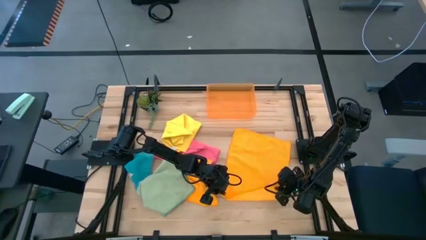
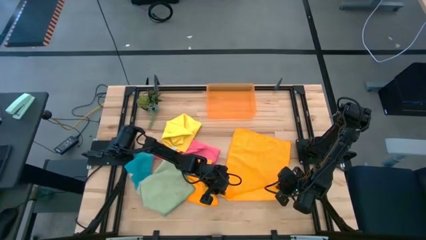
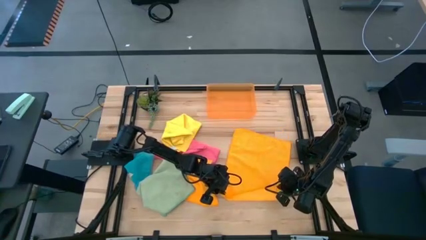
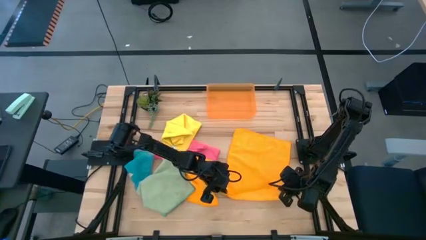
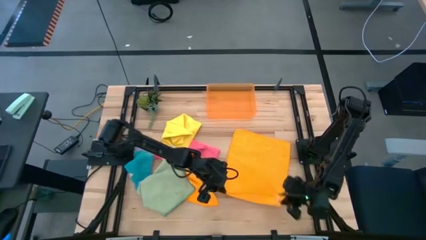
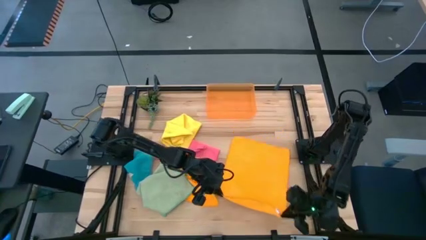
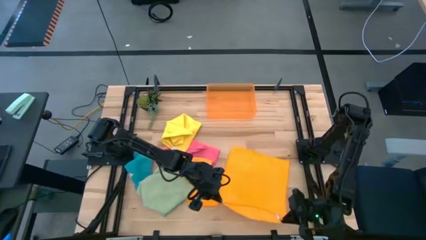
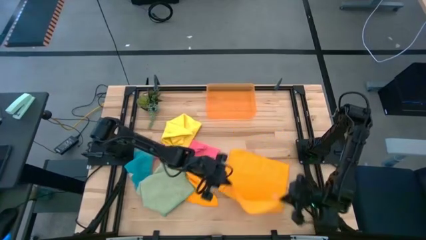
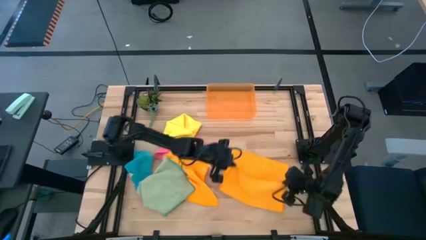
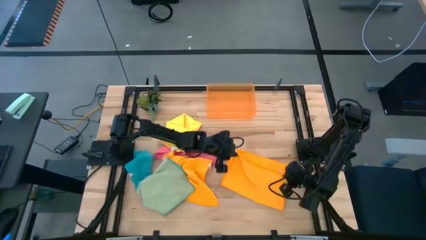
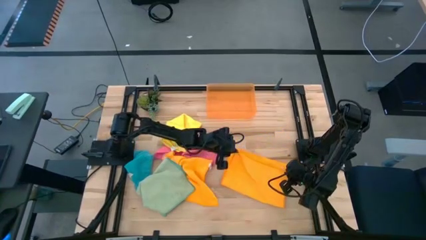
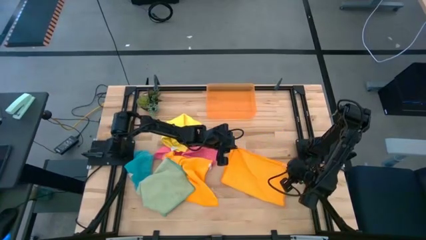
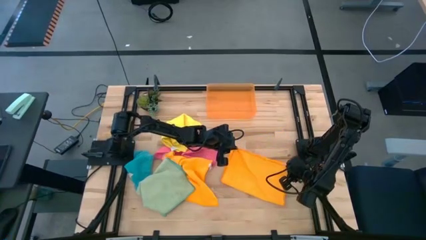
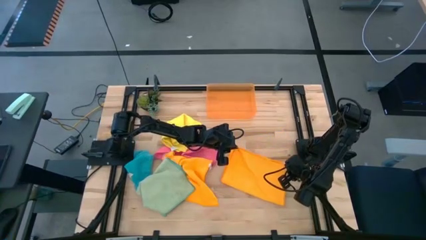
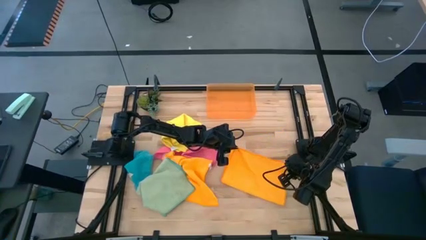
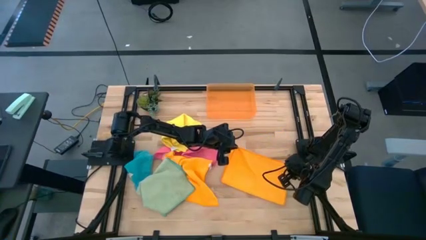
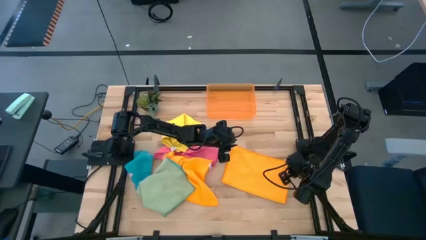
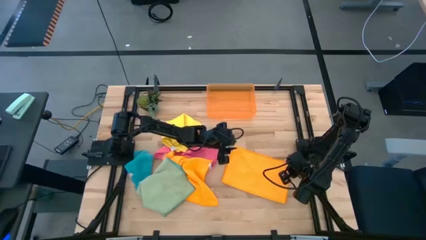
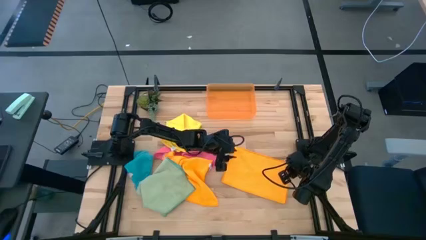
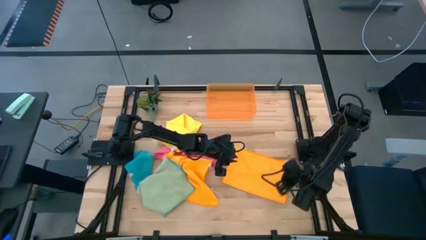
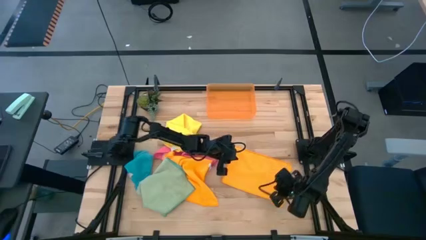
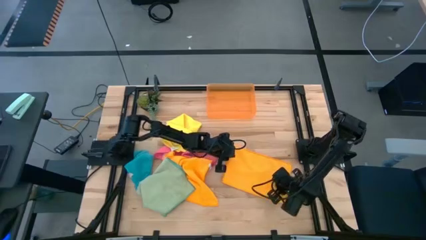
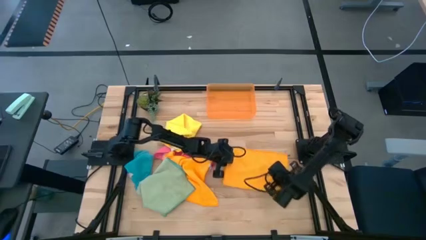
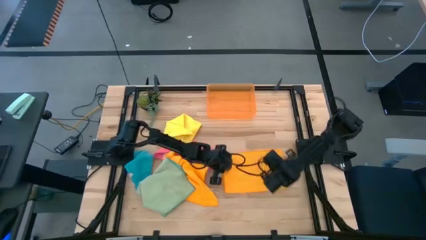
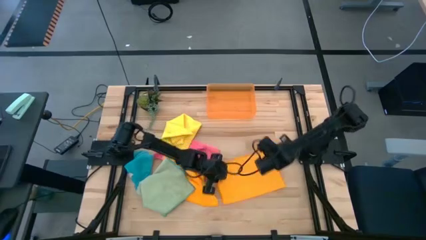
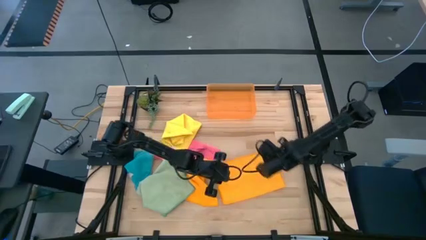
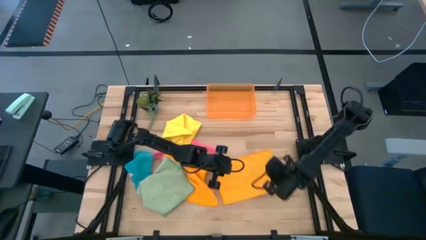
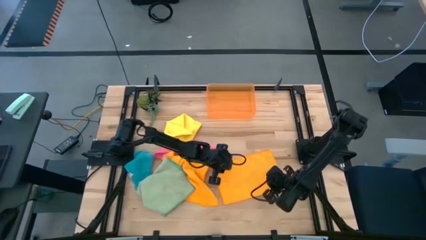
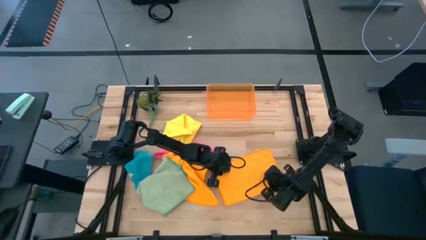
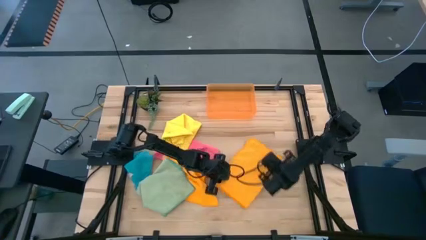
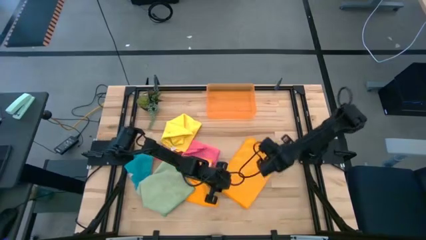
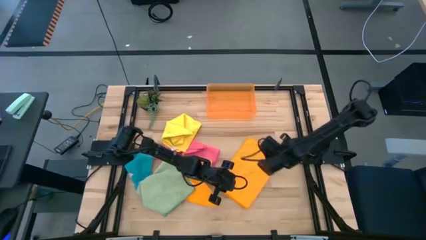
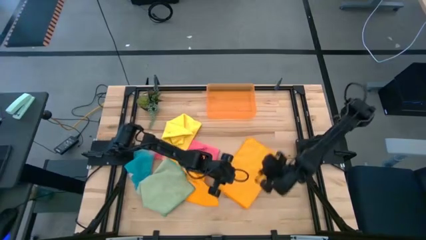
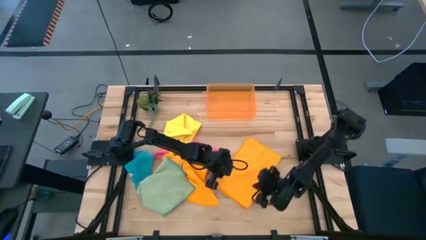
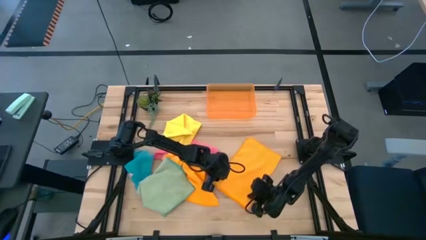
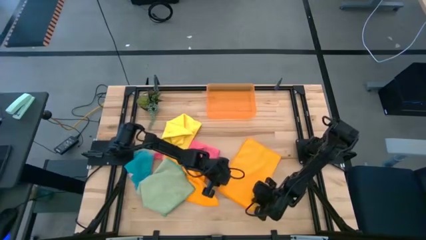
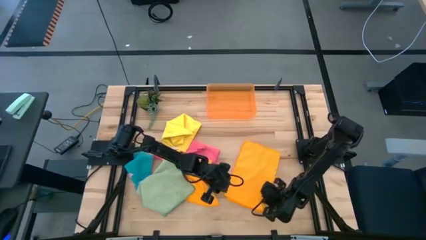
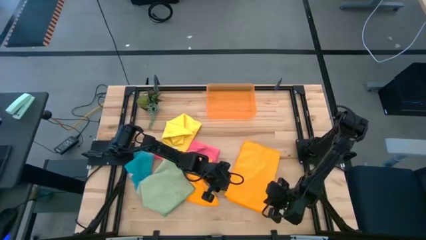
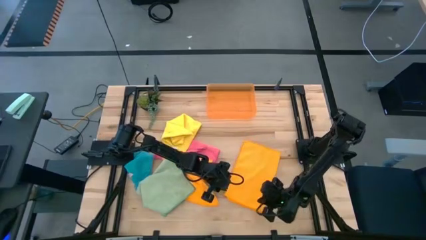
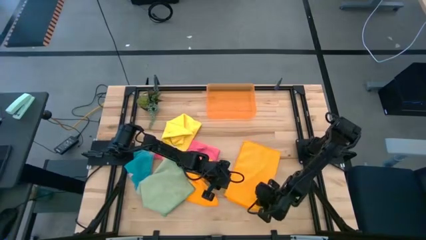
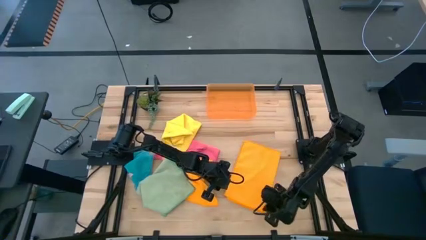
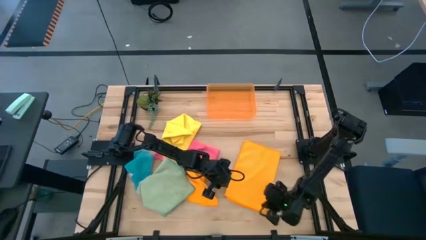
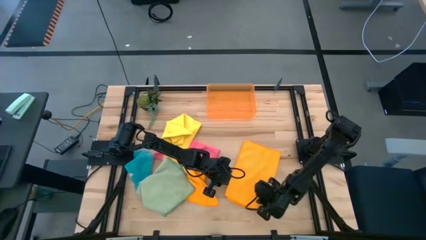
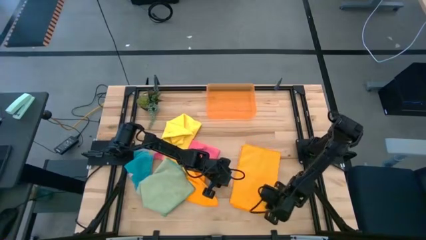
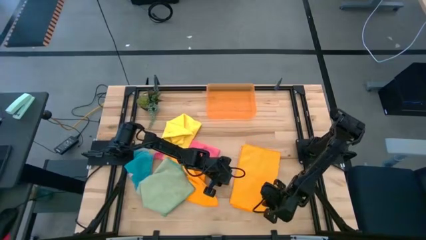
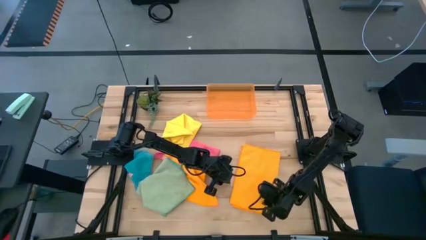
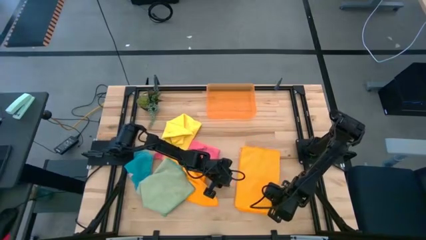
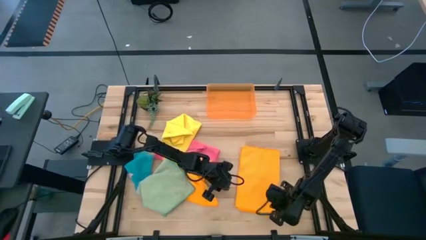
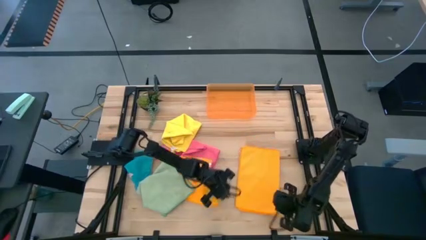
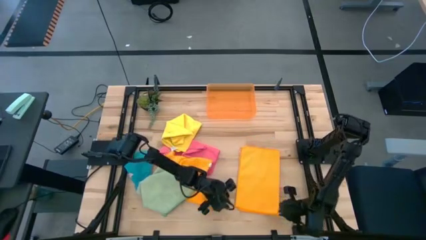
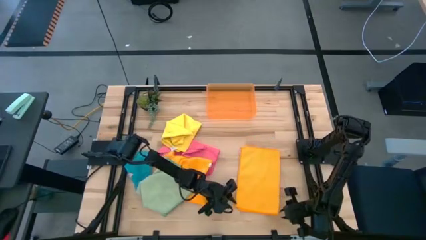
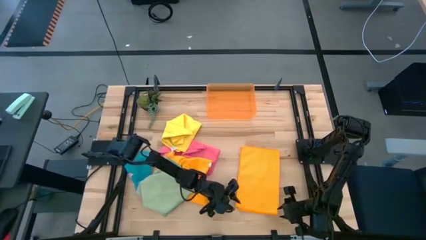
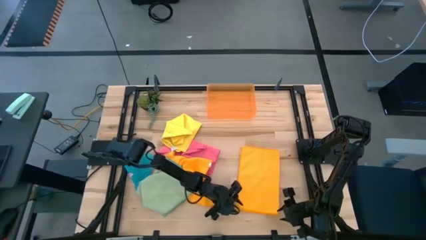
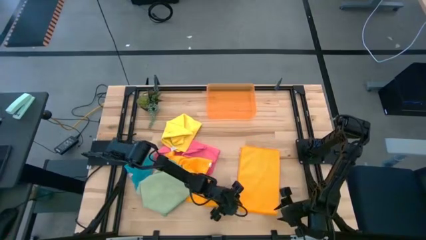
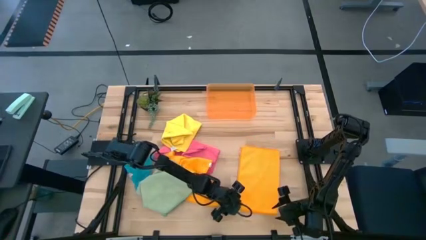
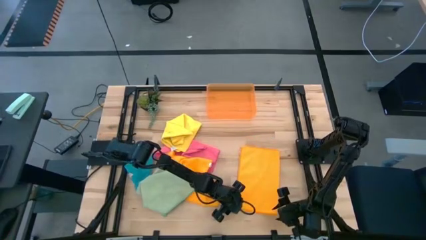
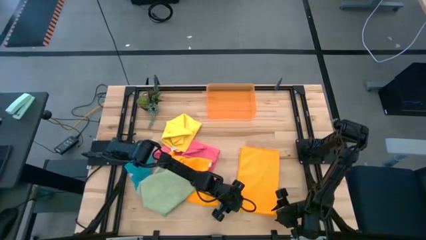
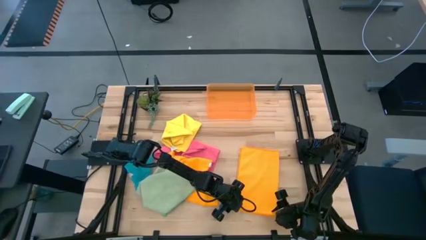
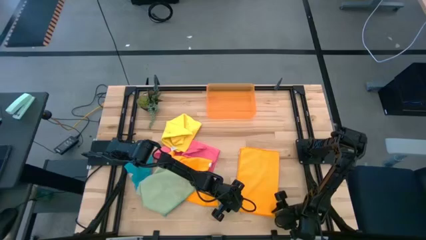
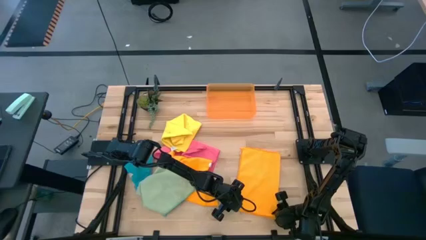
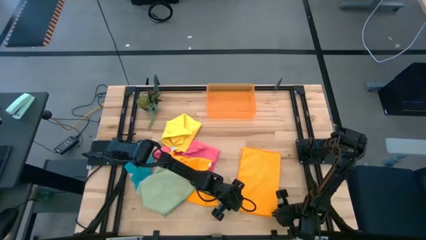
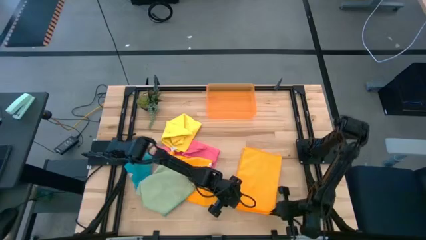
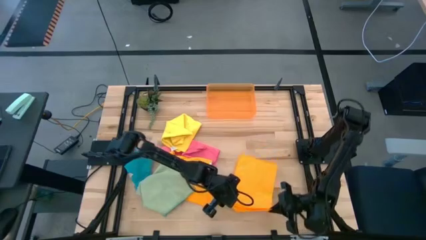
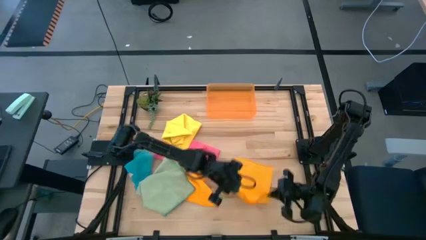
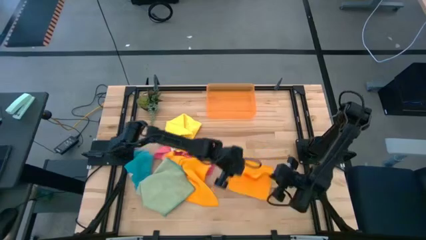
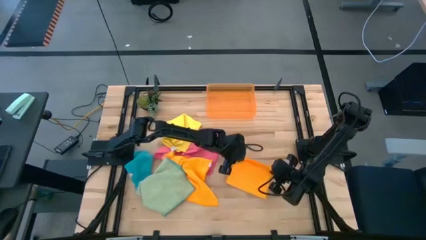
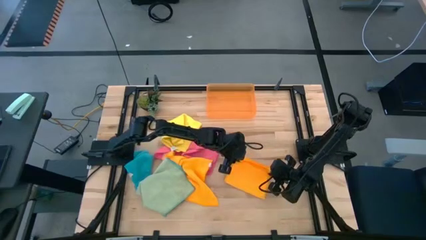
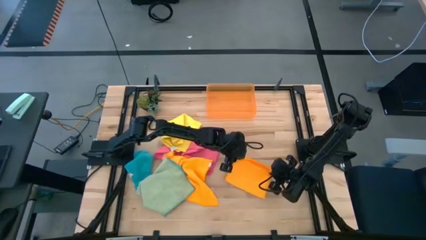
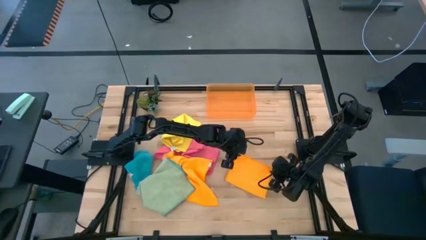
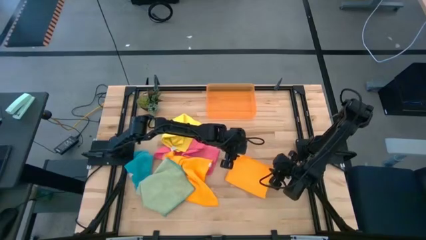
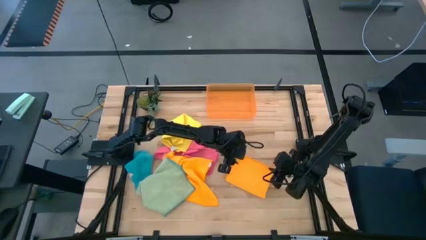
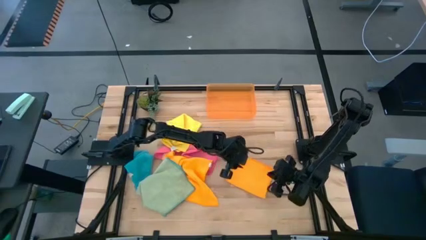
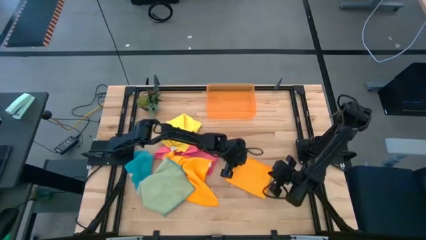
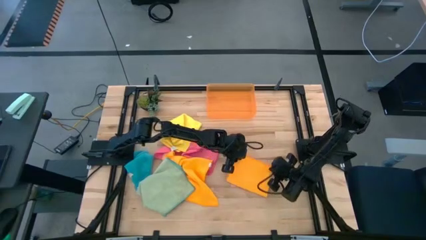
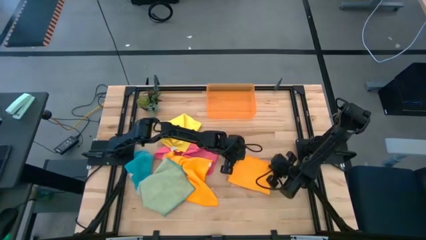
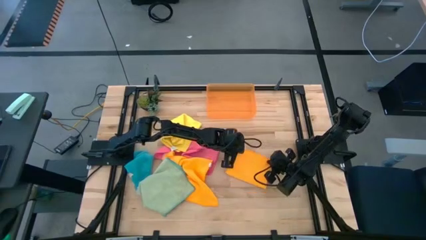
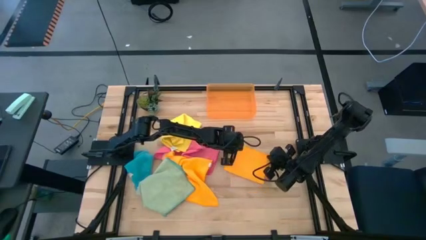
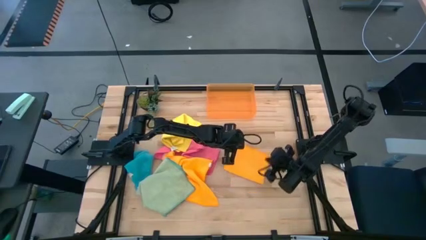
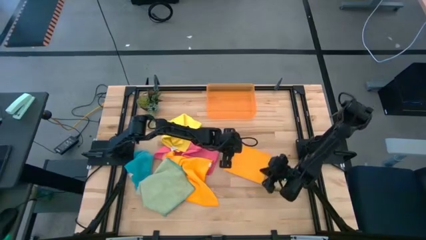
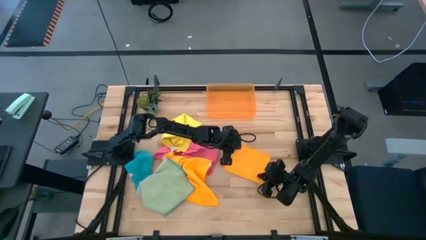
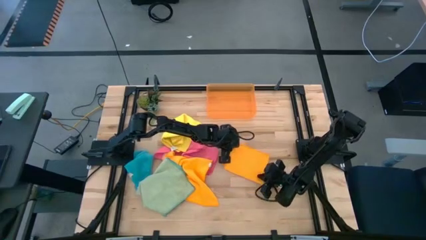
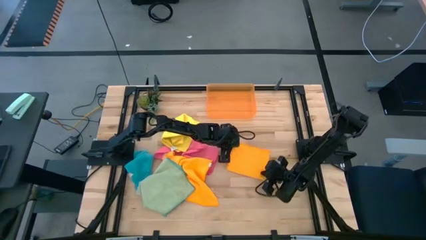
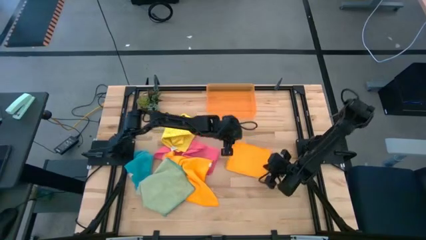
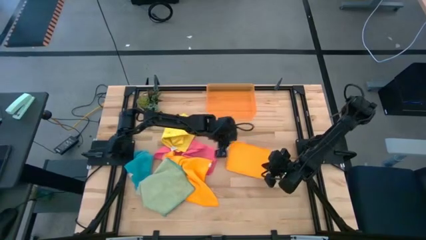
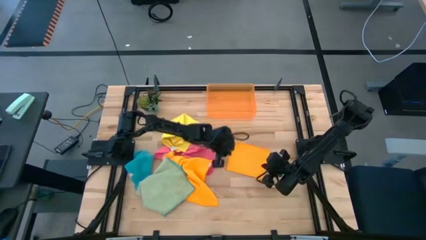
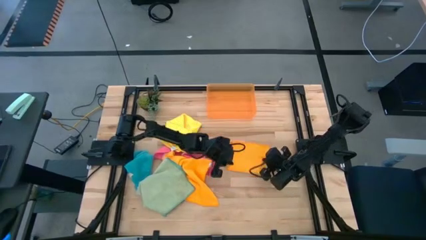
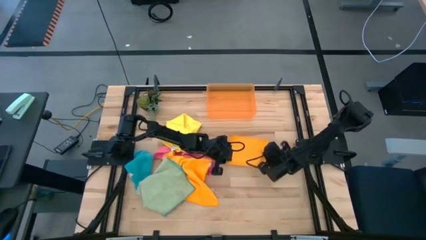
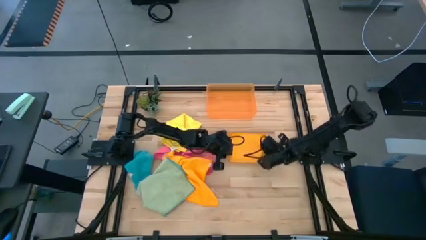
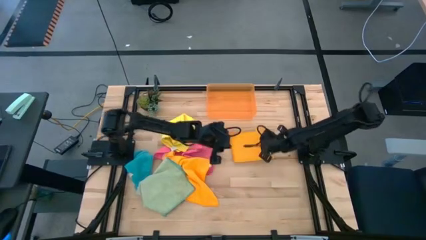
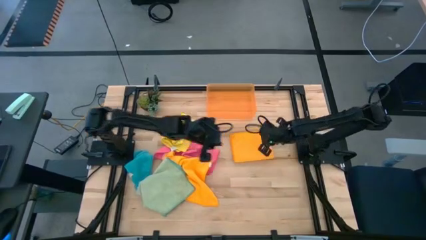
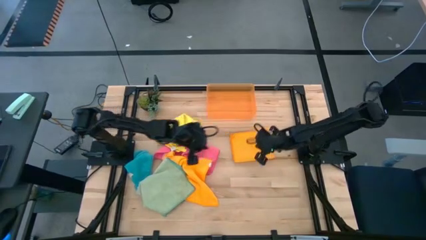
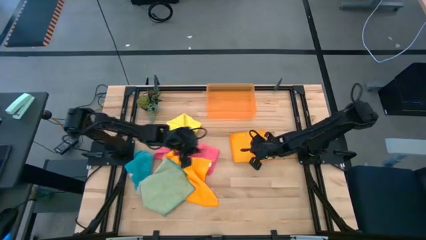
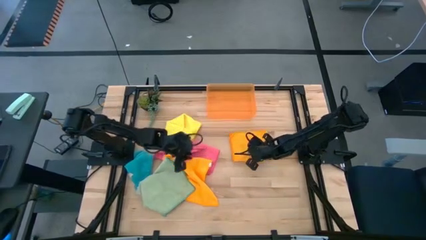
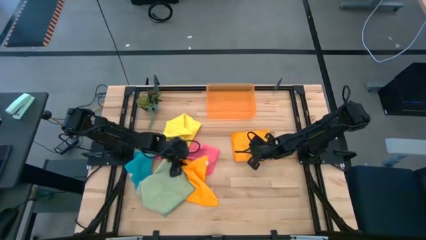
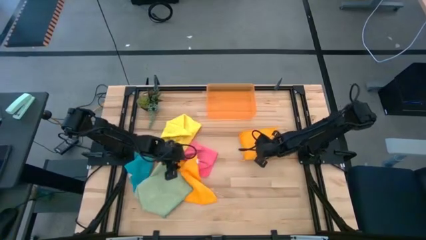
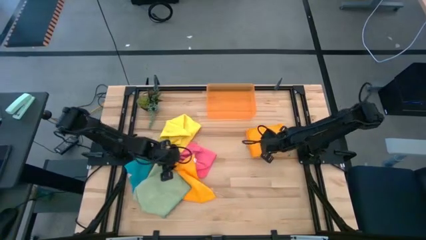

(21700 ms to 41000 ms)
Task: Fold microfiber towels
Fold the left orange microfiber cloth
